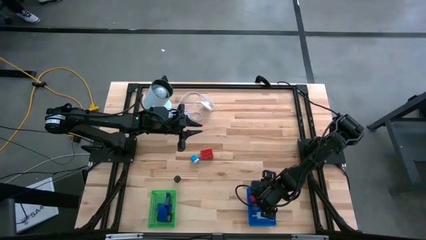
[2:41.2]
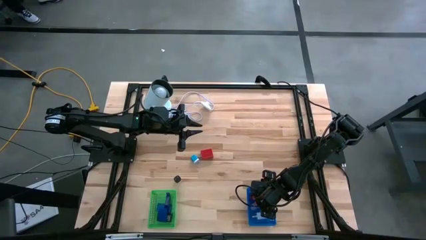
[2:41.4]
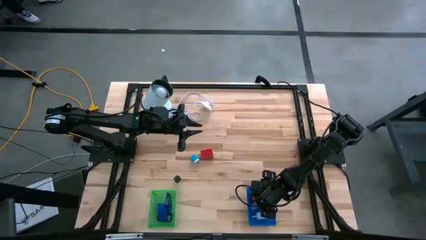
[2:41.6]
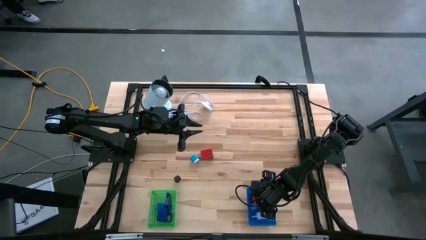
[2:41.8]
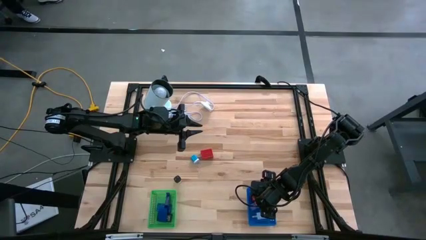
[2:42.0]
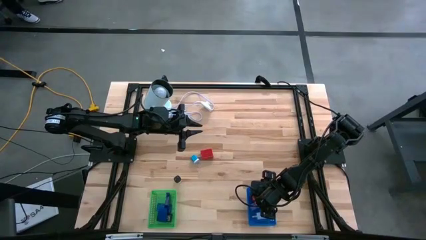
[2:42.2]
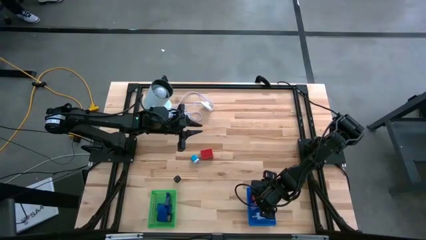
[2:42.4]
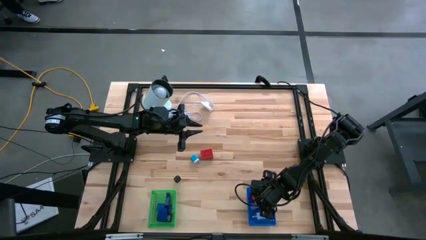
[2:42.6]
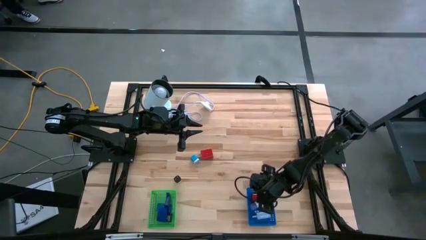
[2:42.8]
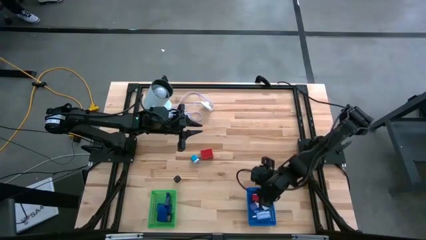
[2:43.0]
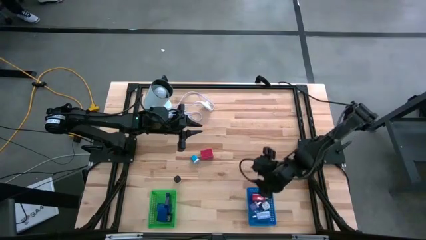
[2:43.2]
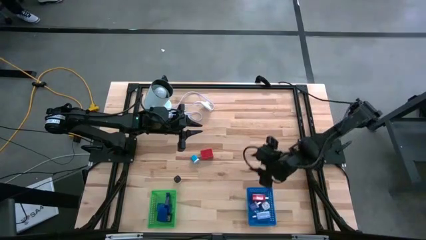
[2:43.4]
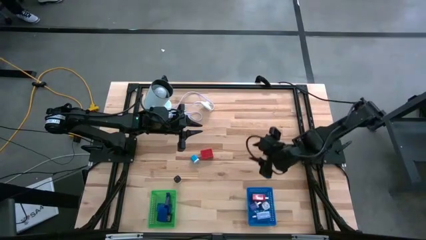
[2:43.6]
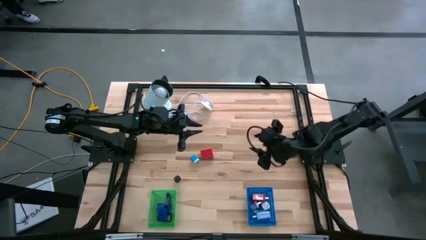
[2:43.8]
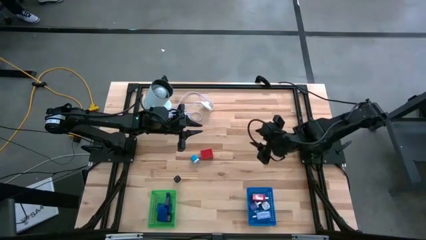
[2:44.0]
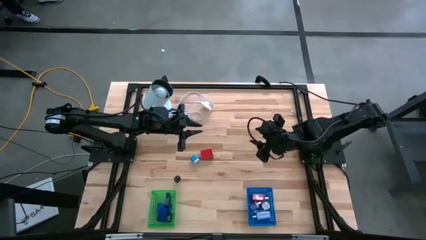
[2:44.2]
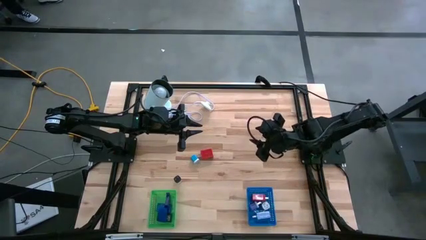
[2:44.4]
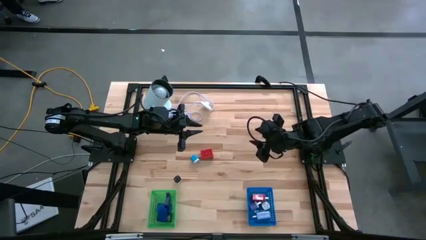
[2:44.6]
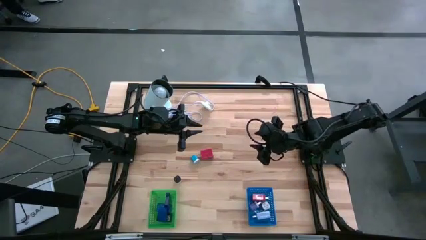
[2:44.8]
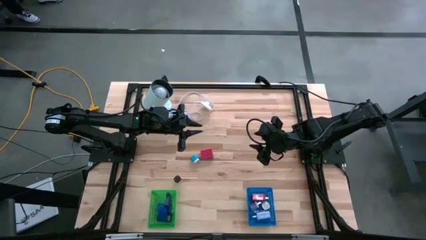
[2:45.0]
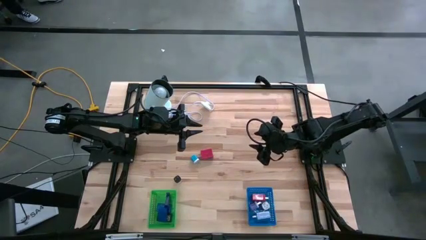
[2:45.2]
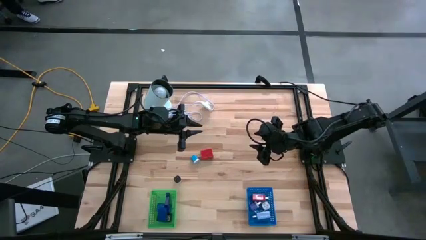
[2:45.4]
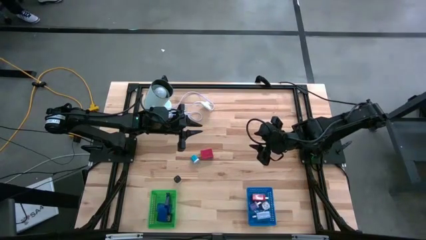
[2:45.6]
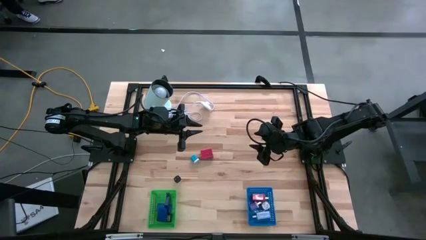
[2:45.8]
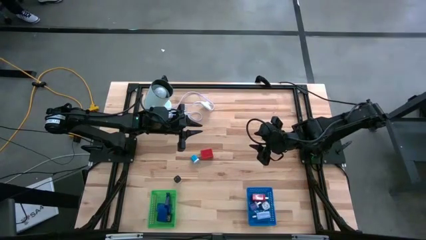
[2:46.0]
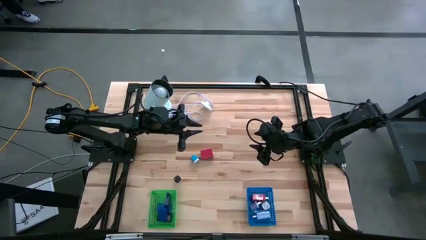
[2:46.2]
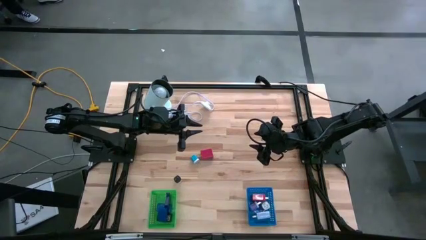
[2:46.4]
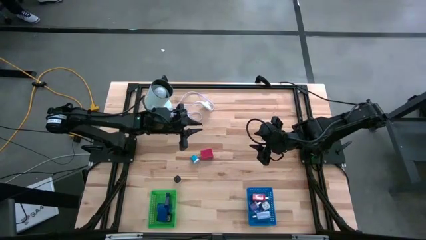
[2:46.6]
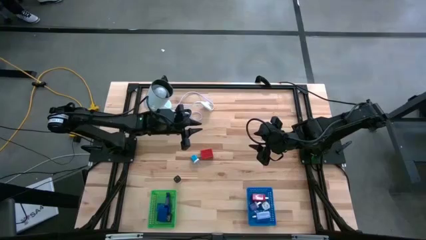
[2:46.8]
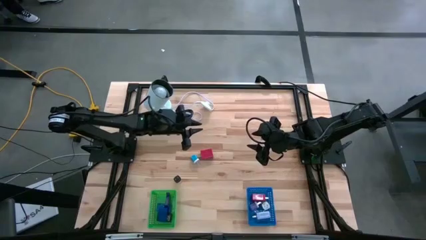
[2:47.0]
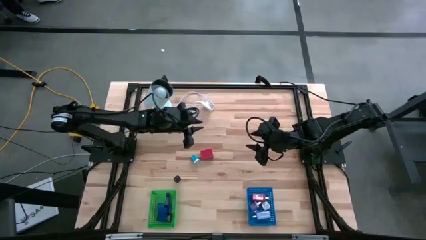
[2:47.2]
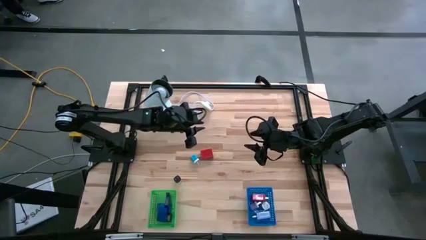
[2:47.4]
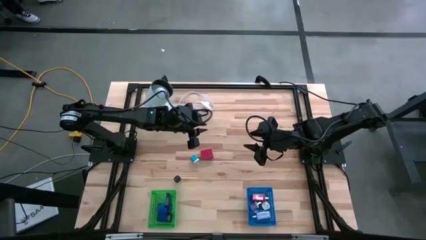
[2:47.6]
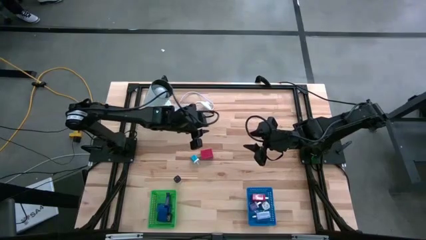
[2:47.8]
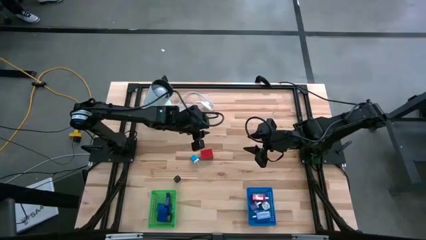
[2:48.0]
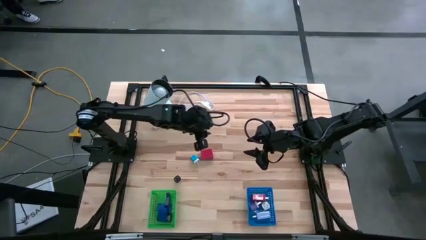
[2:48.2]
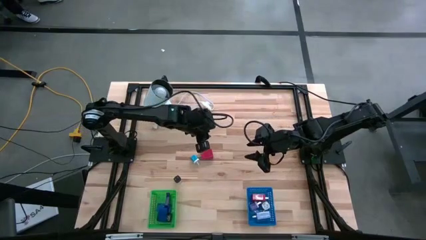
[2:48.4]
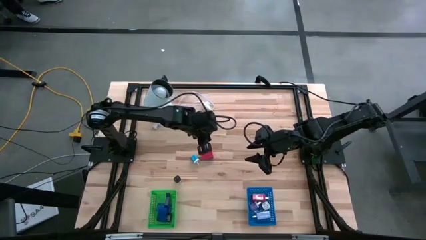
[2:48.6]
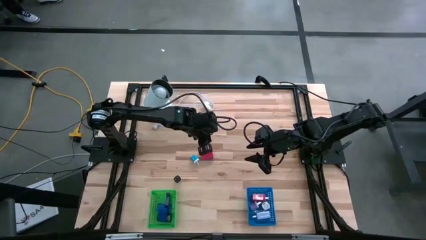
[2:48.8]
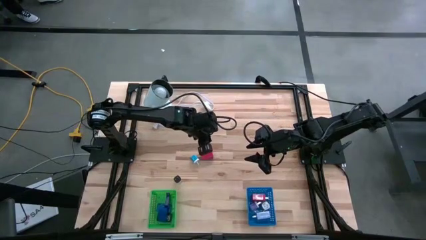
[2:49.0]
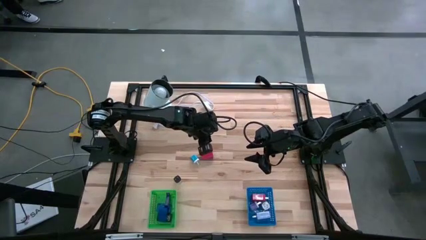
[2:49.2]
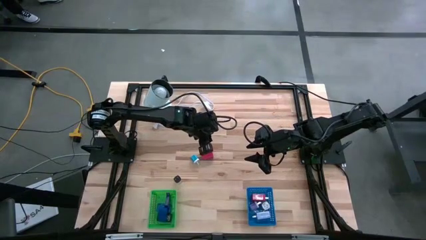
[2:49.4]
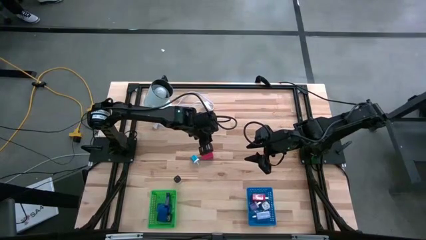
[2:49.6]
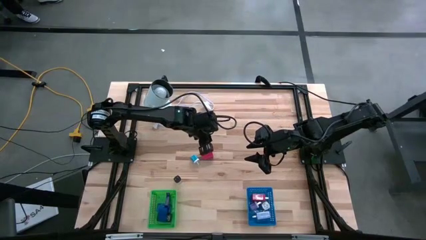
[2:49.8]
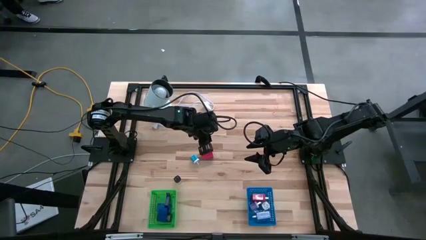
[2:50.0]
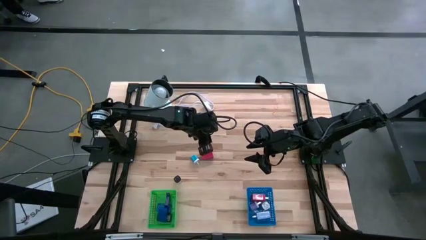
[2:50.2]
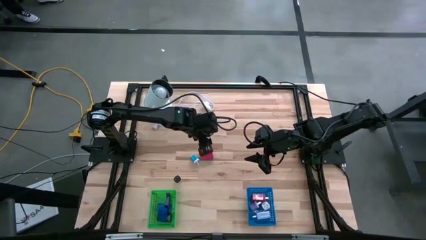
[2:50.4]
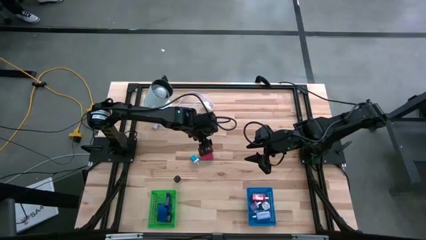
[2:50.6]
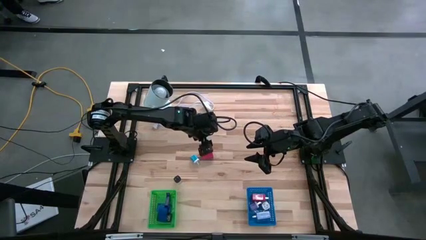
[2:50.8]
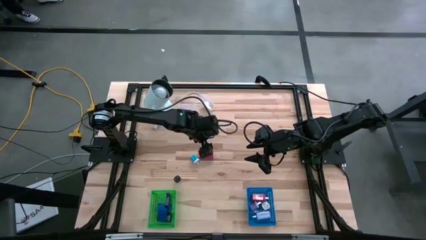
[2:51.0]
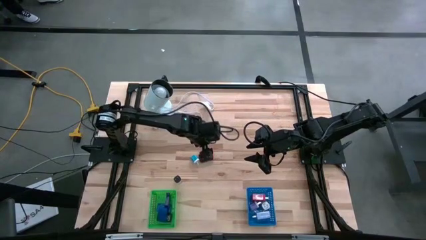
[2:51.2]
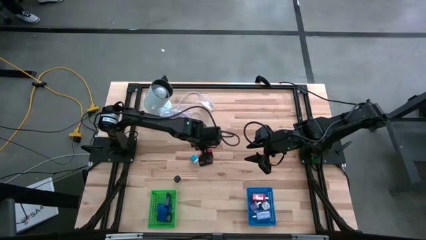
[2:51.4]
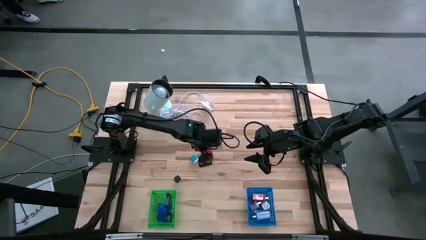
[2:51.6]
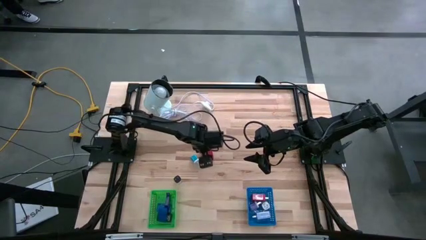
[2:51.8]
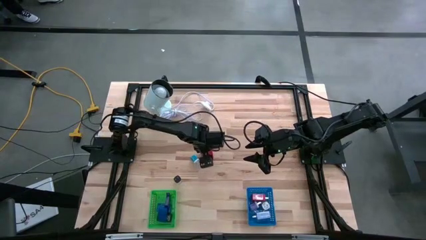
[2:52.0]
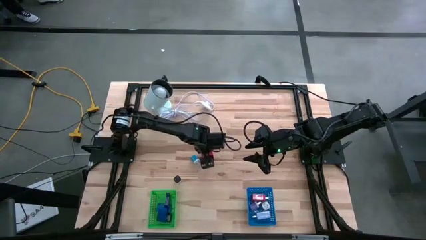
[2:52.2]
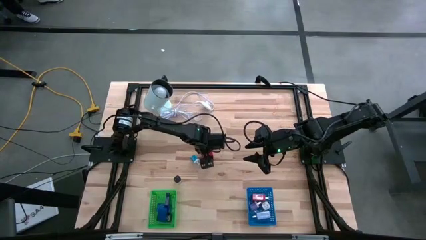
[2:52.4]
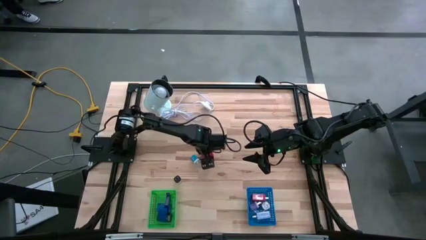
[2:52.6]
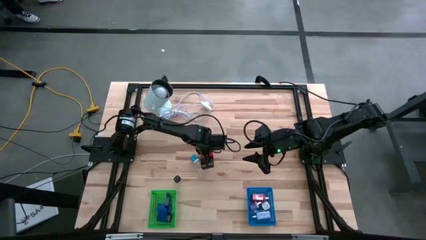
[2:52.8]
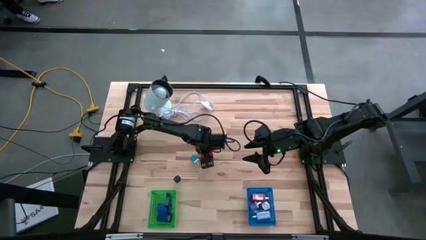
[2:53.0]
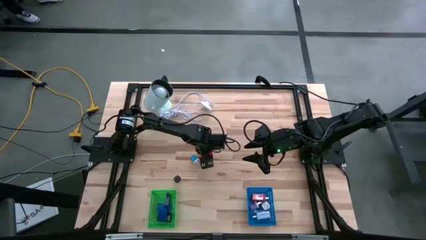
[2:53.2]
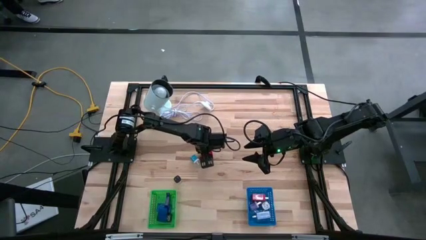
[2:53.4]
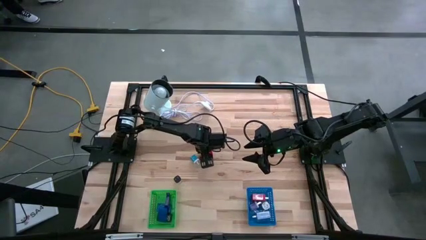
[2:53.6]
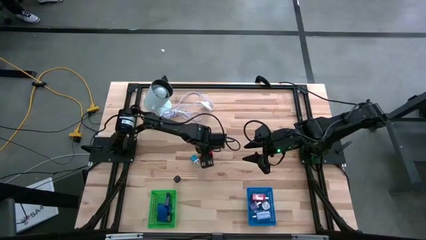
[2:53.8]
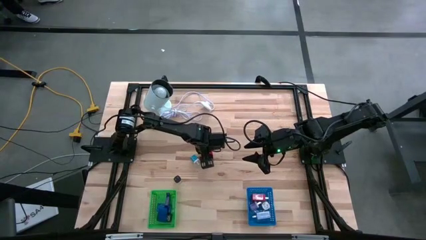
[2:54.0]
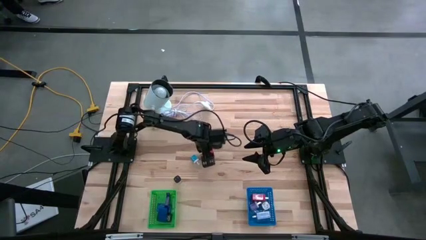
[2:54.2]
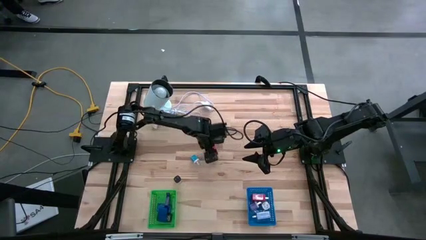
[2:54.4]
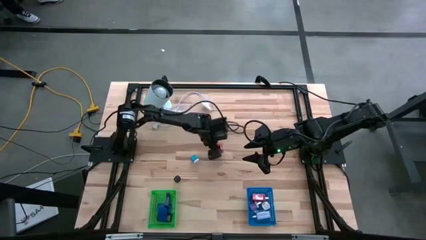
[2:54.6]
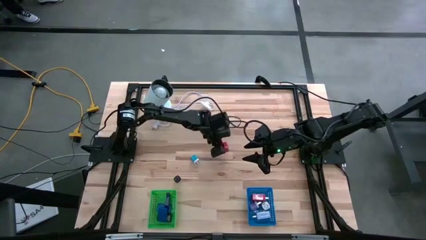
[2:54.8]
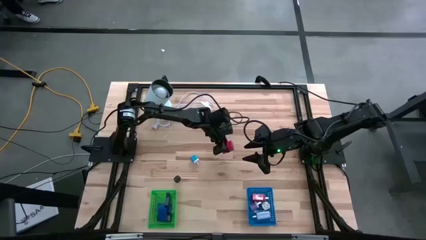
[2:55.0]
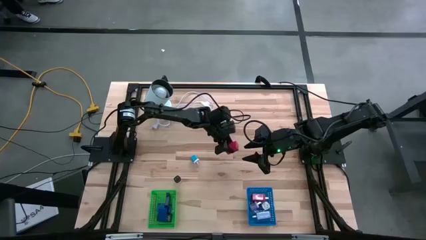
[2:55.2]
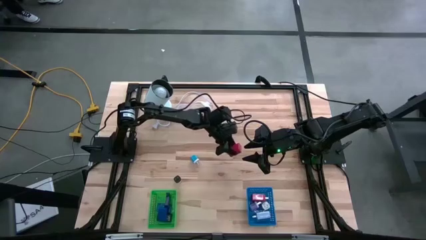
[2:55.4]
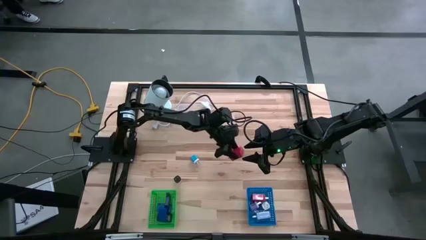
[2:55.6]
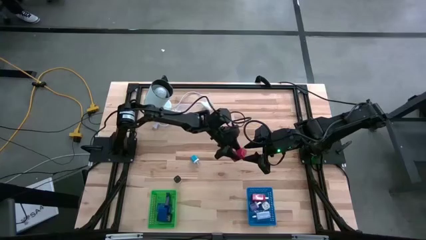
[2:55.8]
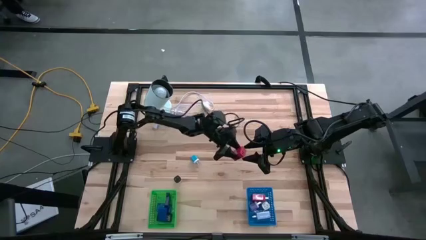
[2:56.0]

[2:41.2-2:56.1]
Task: Pick & Place Office items
Put the red charger adapter into the blue bin

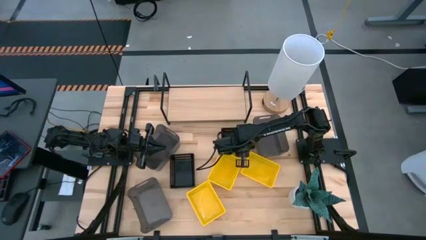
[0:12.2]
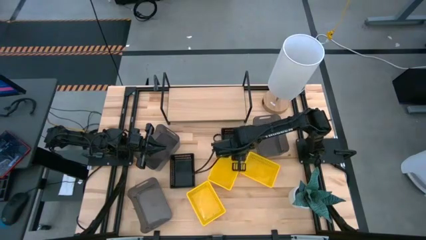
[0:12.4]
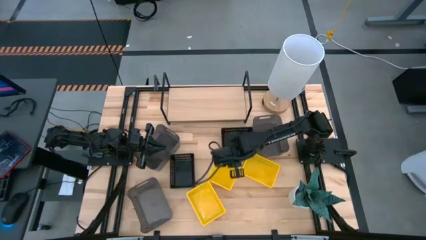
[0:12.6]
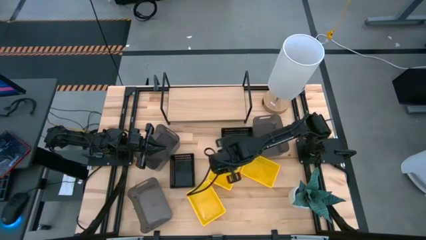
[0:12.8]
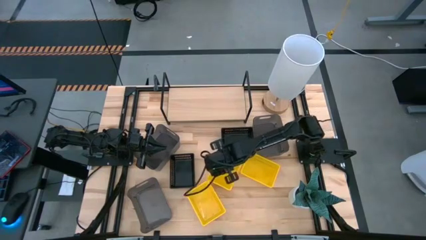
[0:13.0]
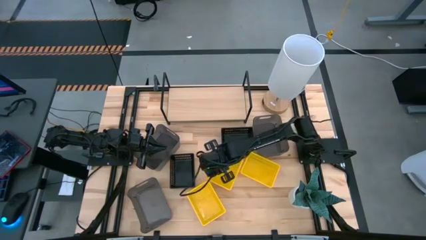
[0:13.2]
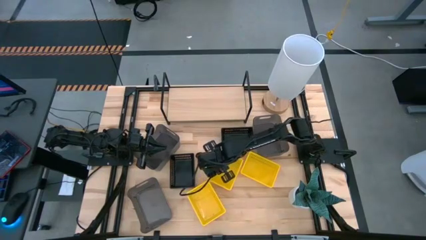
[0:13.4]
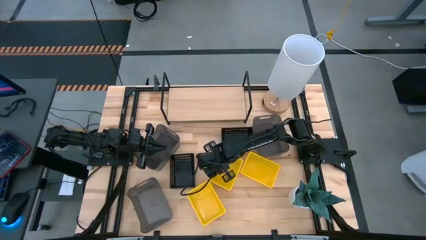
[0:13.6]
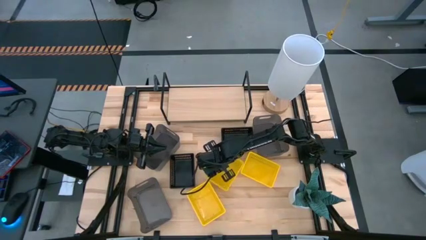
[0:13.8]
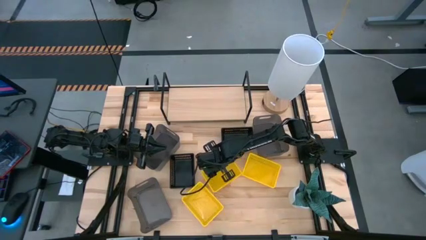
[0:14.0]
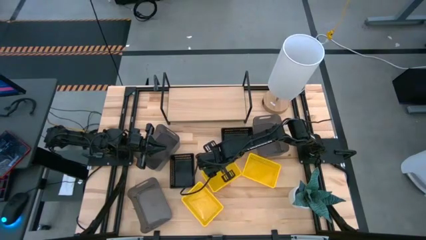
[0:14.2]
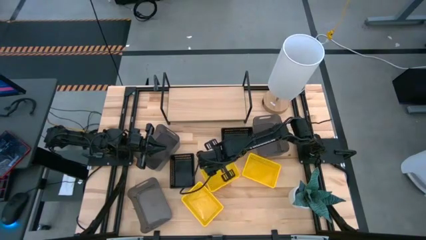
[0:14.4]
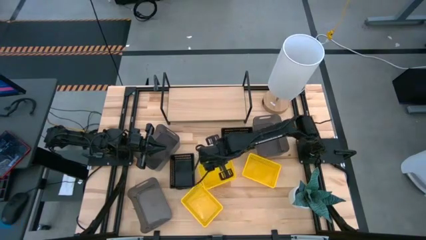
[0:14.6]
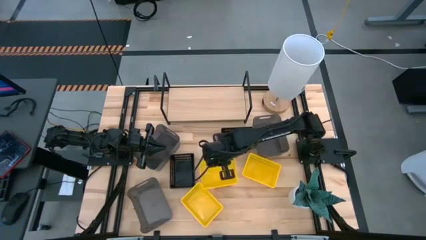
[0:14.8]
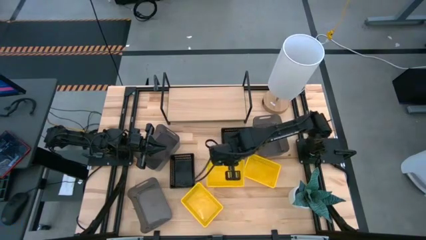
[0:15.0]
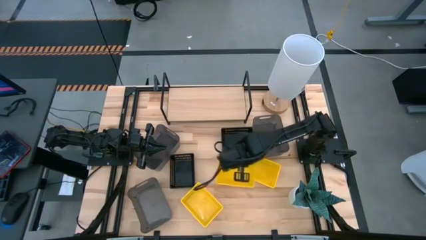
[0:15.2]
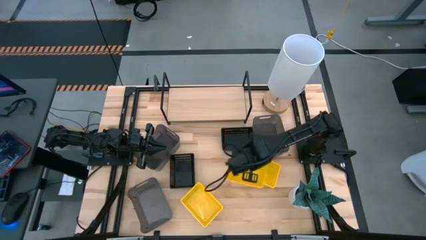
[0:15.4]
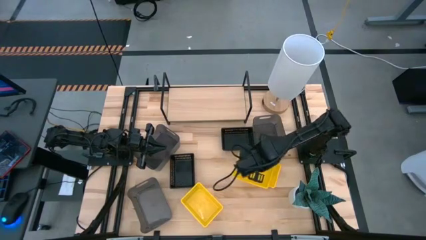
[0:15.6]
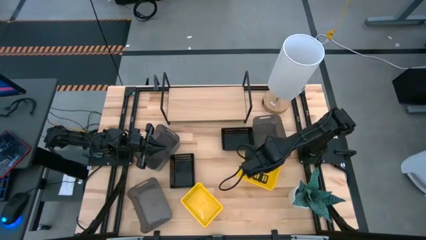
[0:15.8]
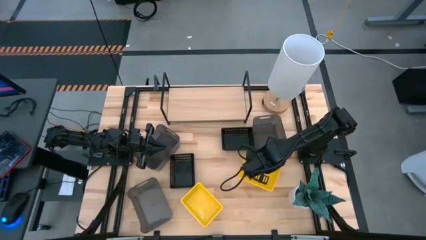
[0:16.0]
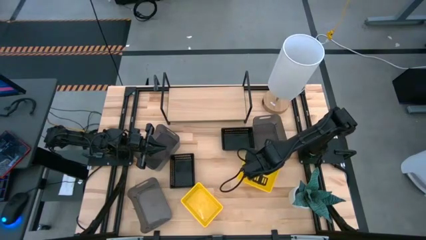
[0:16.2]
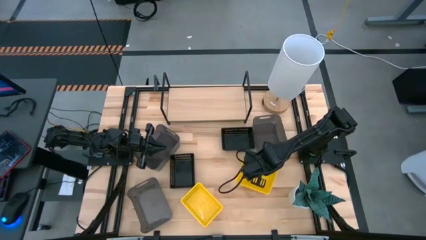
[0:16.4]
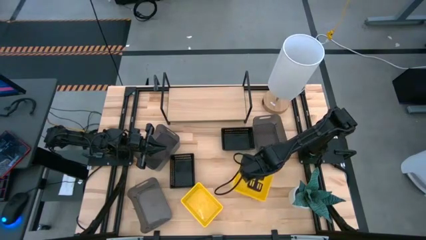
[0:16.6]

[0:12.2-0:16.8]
Task: Stack baskets on shelf by color
Stack the middle yellow bin on top of the right yellow bin
